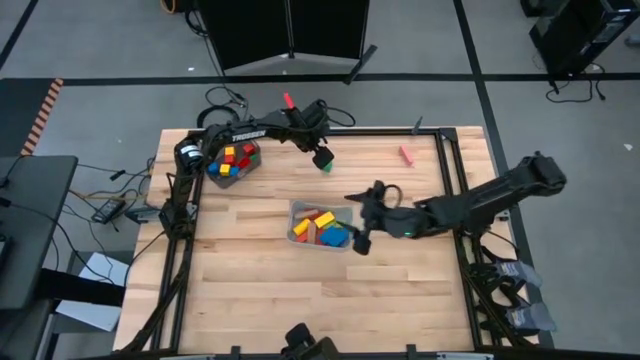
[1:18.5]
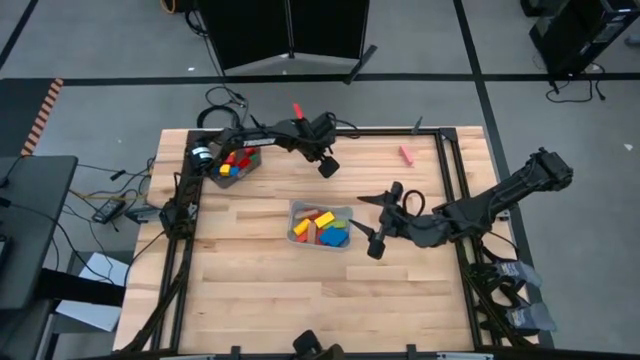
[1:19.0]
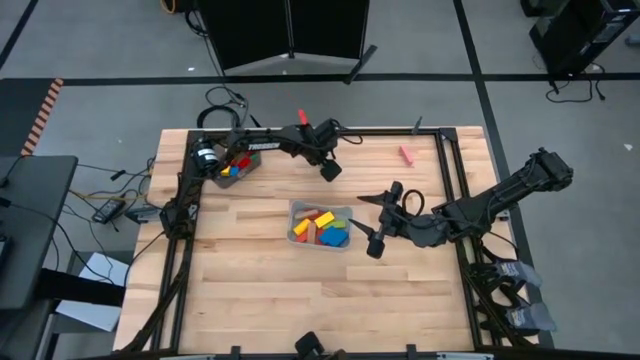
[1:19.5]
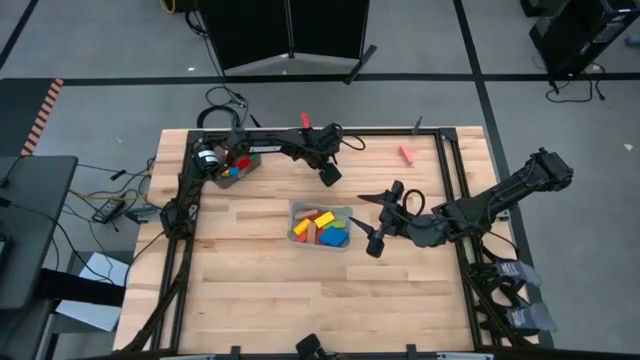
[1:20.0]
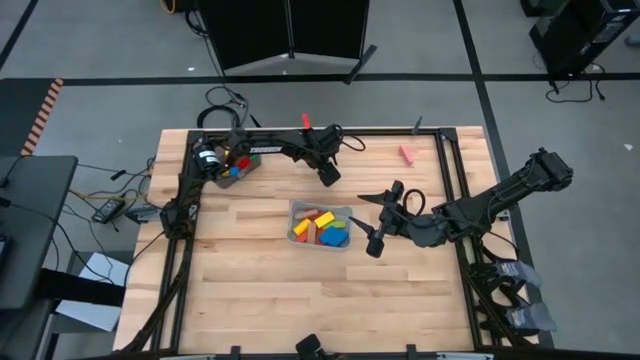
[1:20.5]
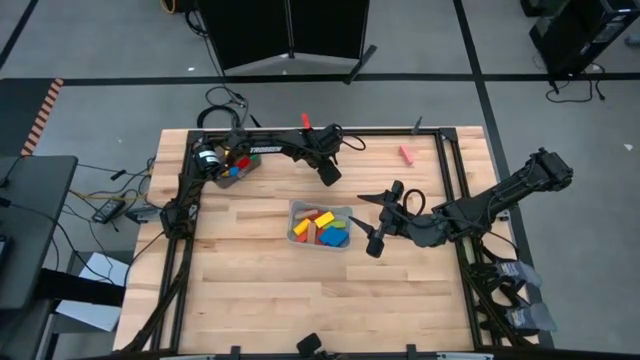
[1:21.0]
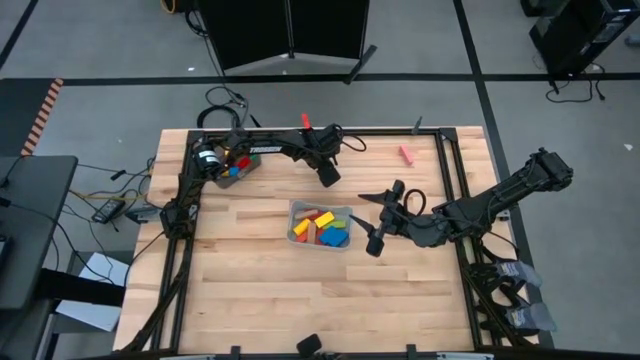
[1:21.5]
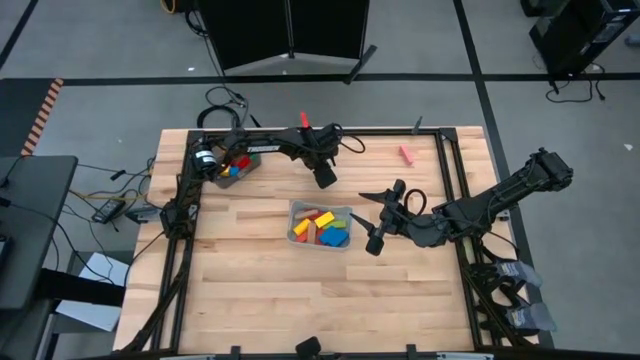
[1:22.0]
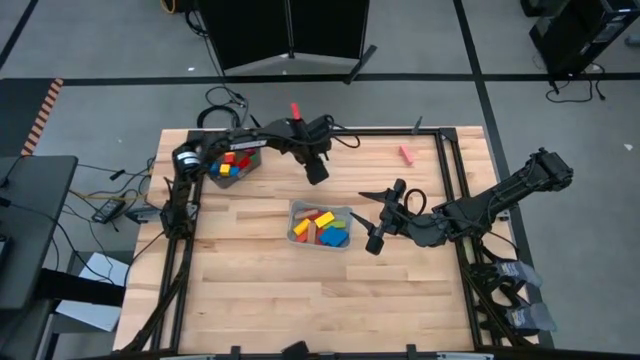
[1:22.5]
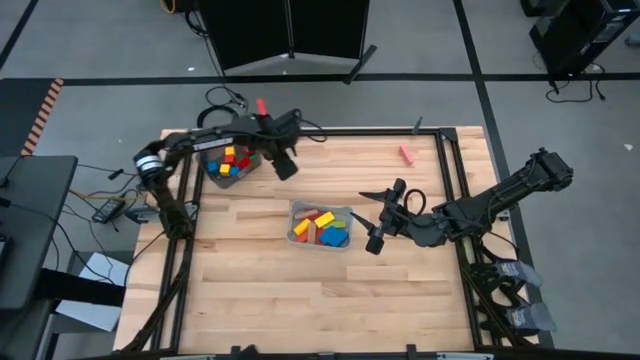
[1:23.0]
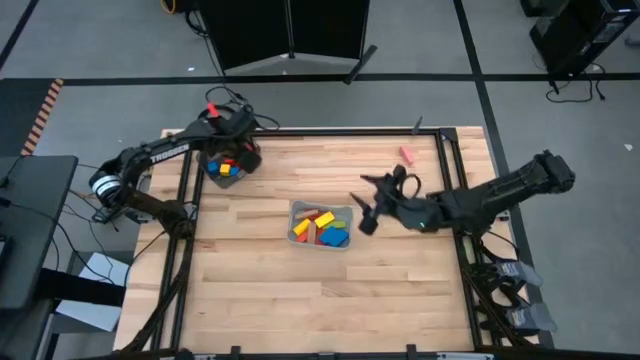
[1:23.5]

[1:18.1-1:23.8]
Task: Sort blocks by size
Put the green cube block into the black bin

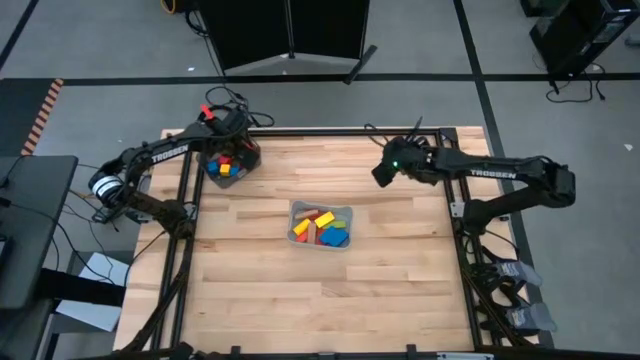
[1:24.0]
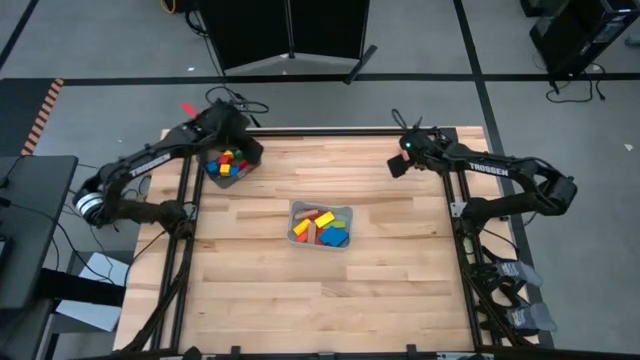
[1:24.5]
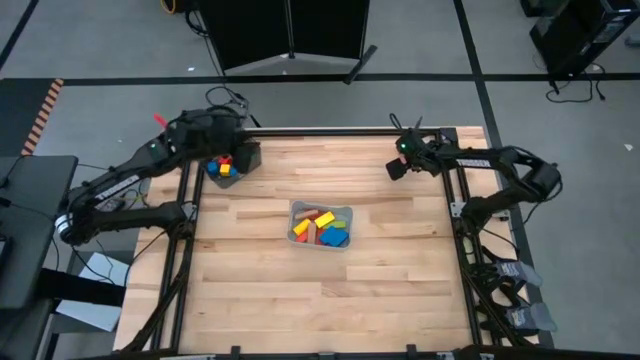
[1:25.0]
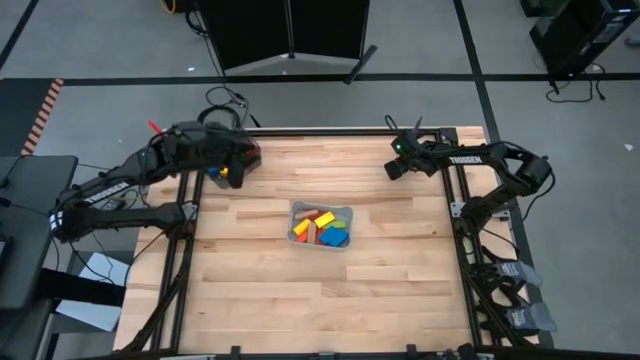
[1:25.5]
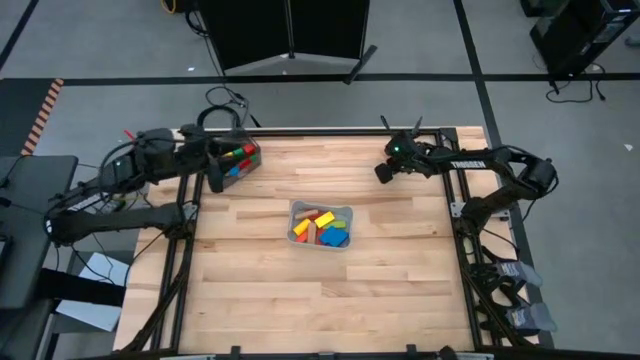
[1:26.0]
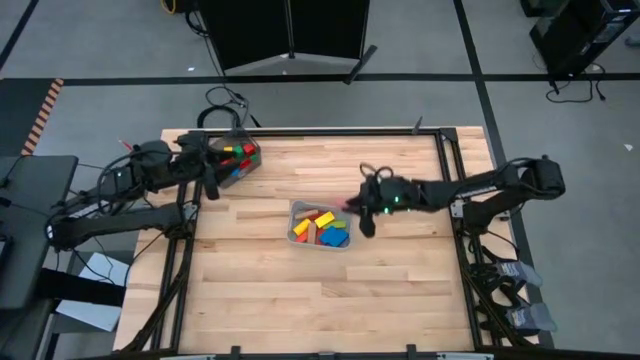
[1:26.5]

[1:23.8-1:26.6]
Put the pink rectangular block into the gray bin

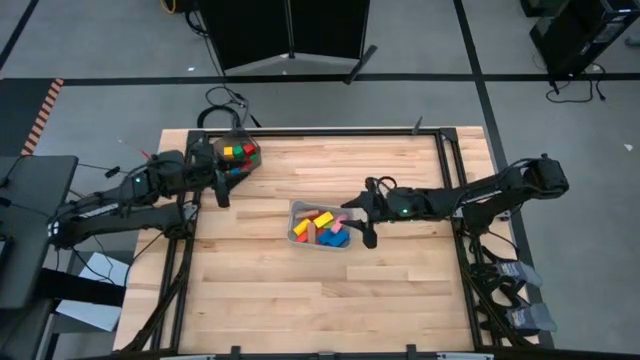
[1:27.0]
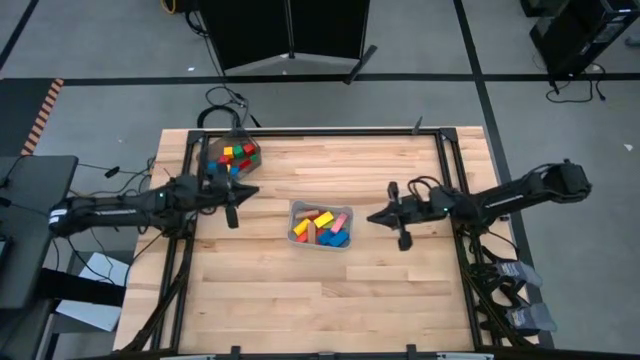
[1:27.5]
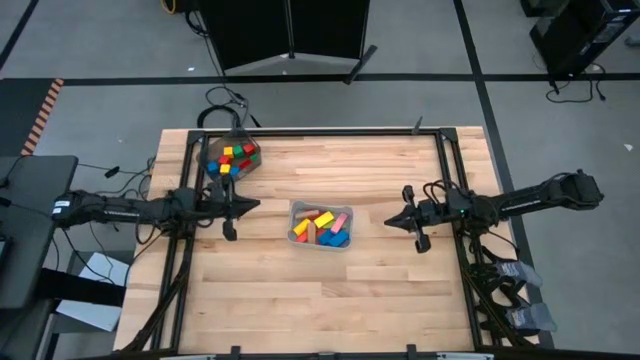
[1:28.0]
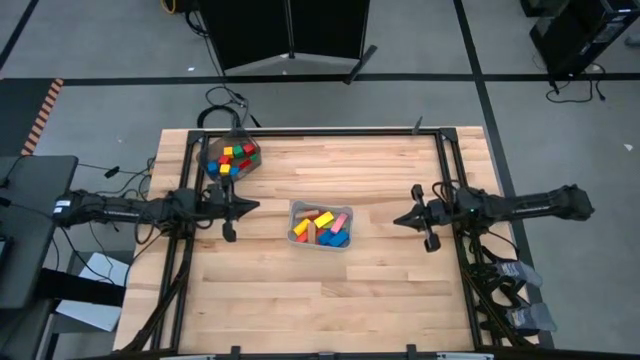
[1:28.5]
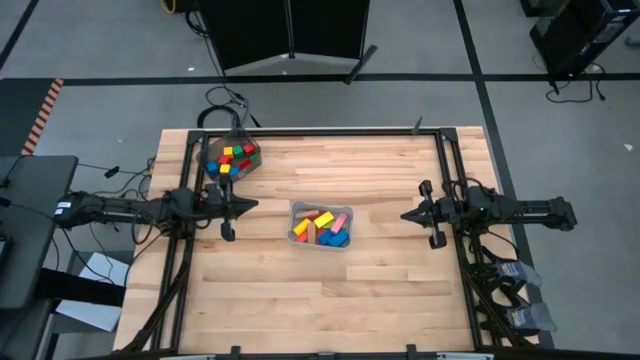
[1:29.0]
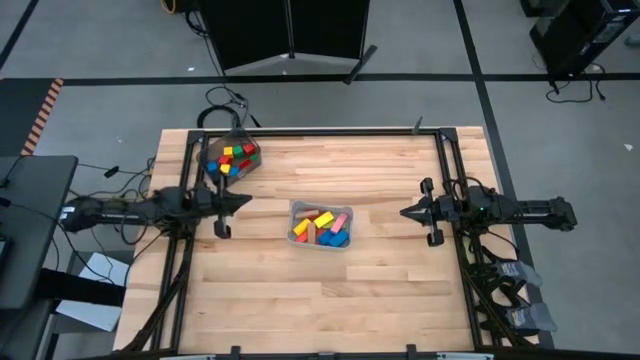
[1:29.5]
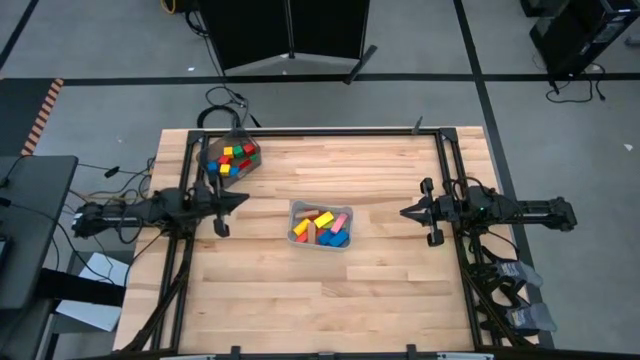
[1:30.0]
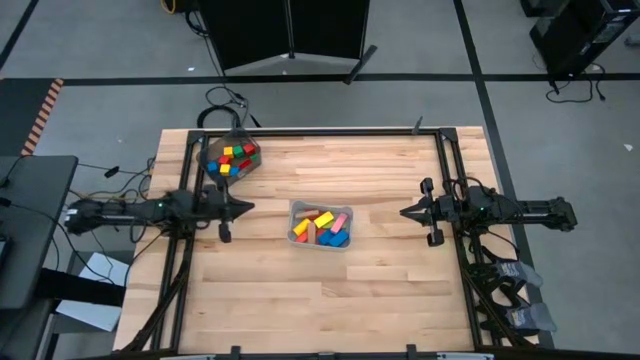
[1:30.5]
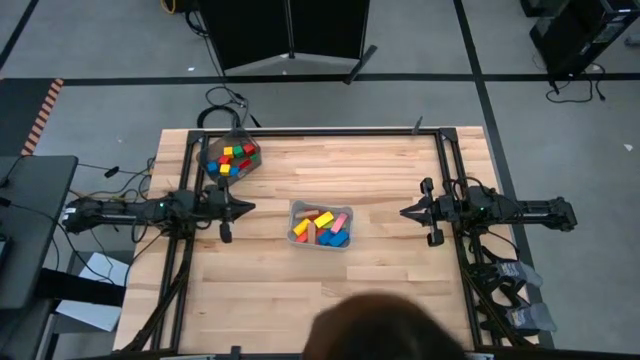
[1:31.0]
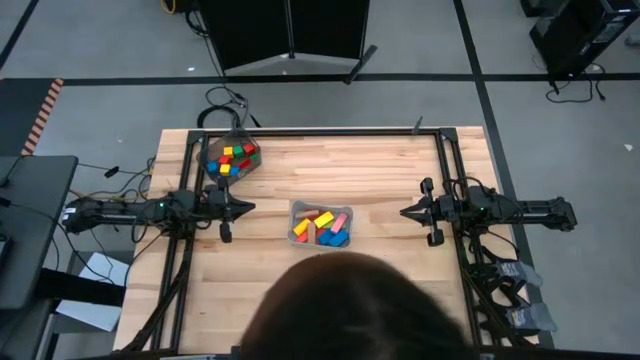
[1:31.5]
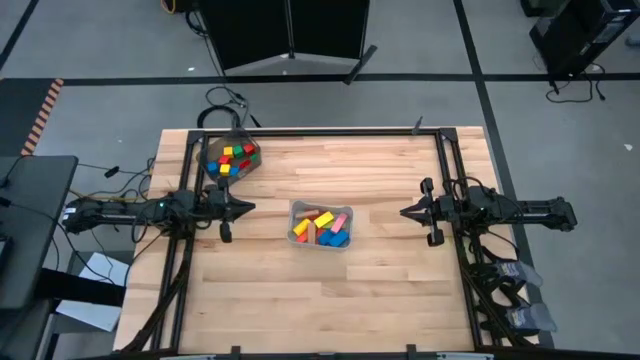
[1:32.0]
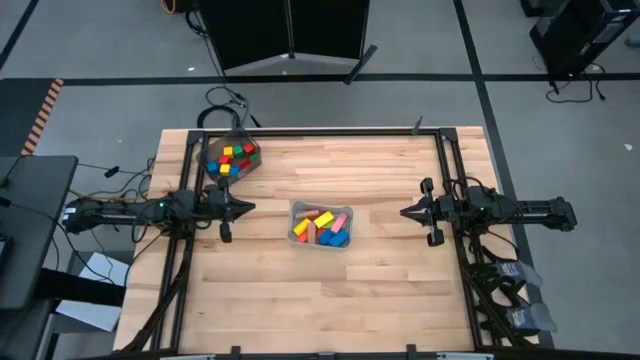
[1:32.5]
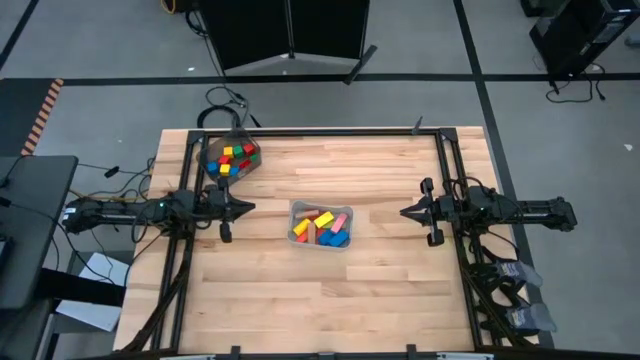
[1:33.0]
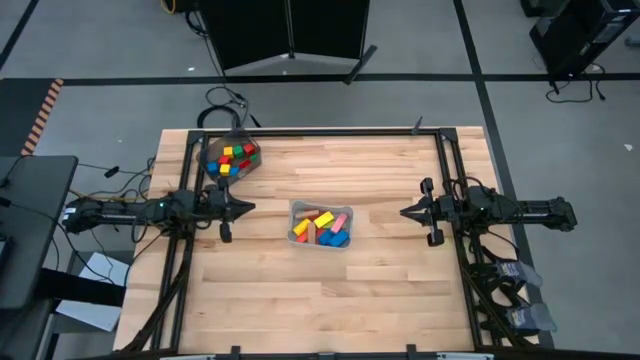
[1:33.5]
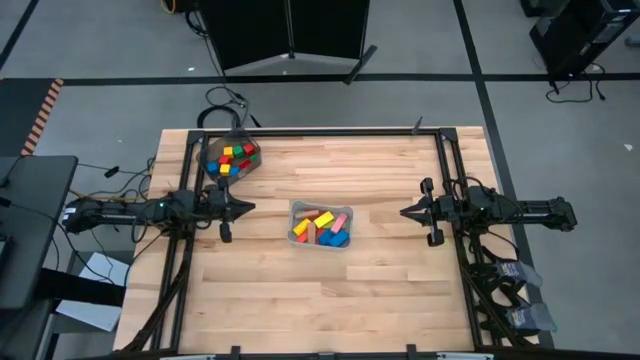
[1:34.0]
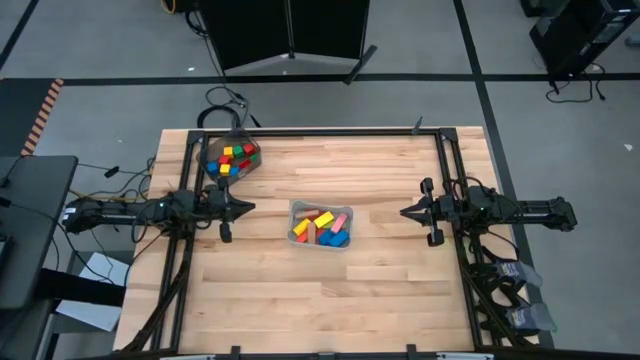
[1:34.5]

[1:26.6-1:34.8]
Return to Home Position

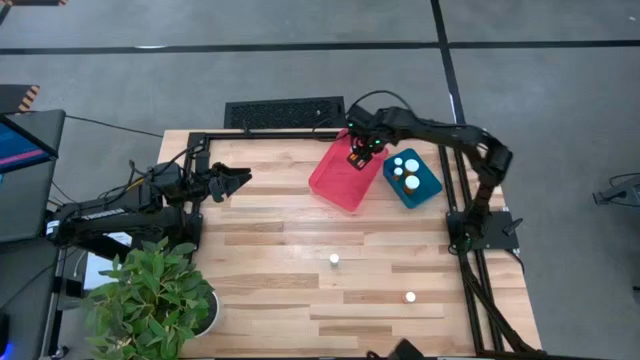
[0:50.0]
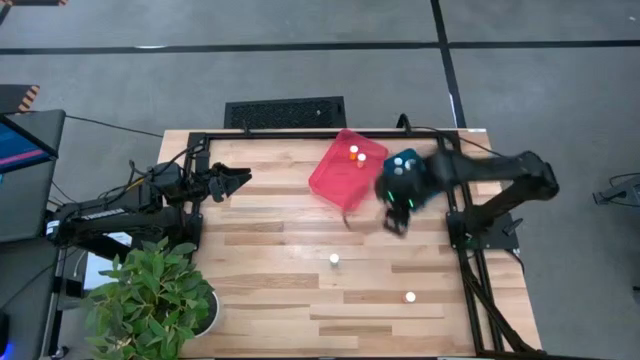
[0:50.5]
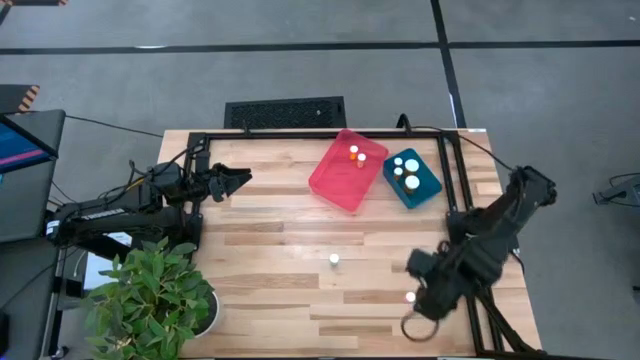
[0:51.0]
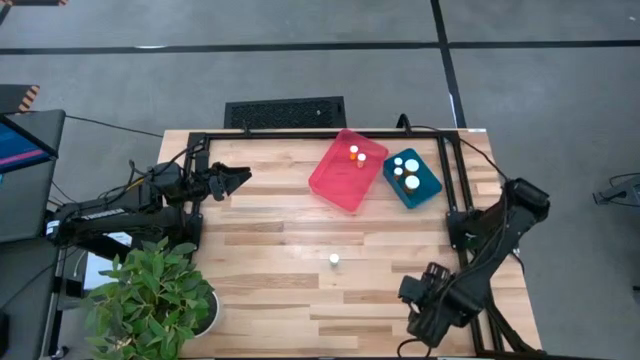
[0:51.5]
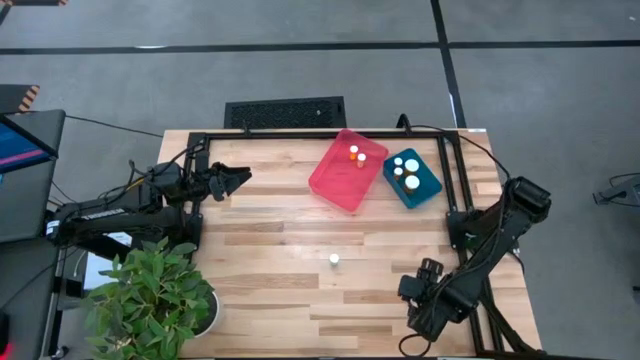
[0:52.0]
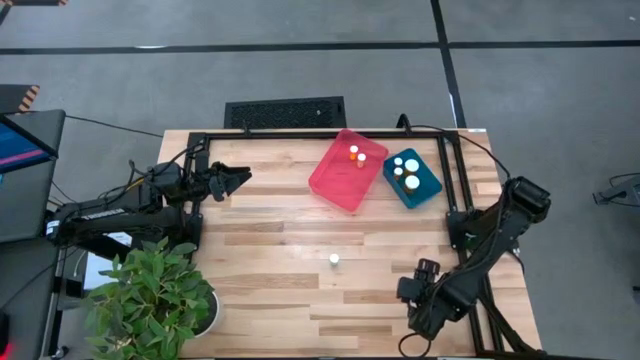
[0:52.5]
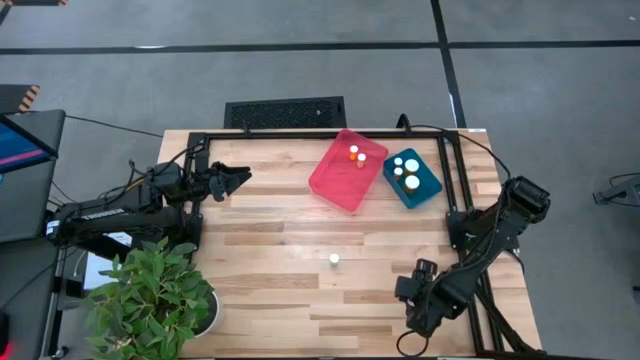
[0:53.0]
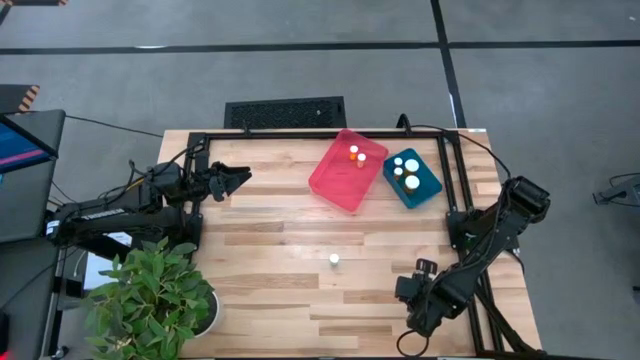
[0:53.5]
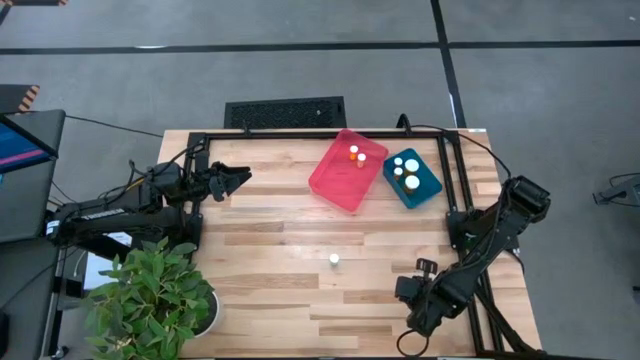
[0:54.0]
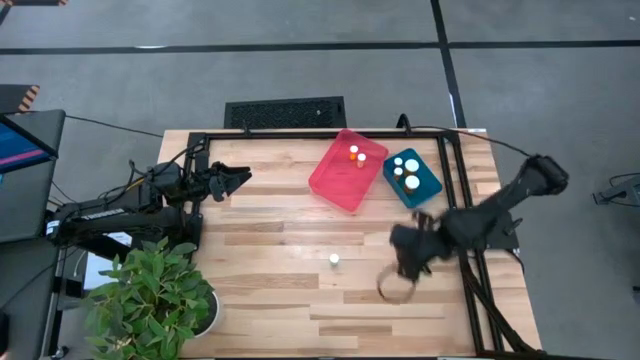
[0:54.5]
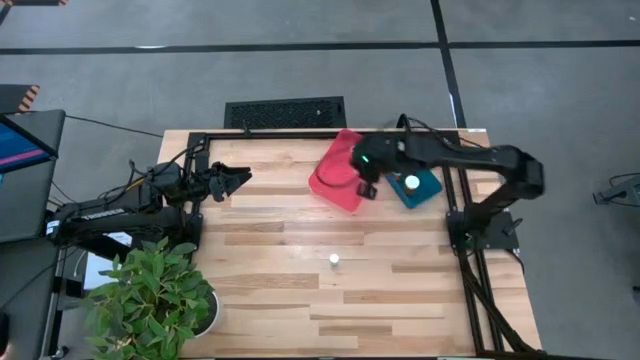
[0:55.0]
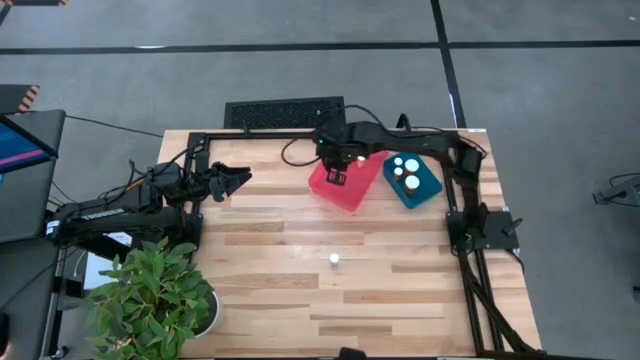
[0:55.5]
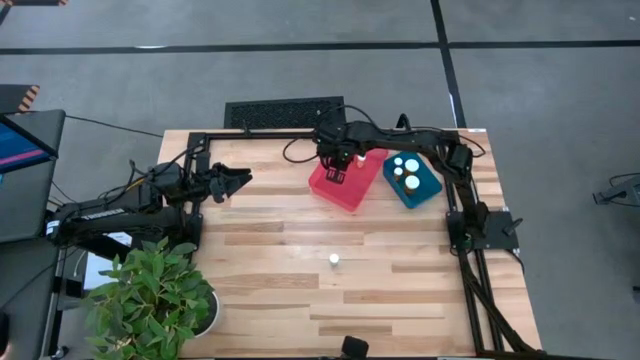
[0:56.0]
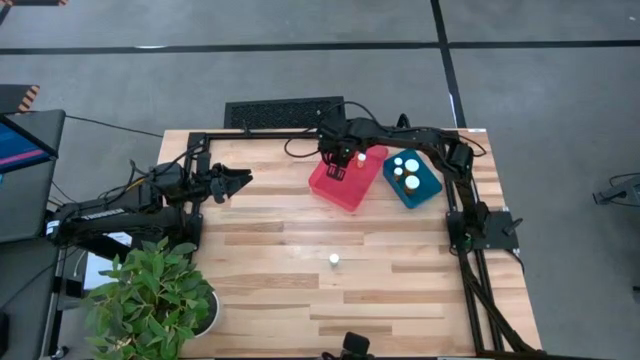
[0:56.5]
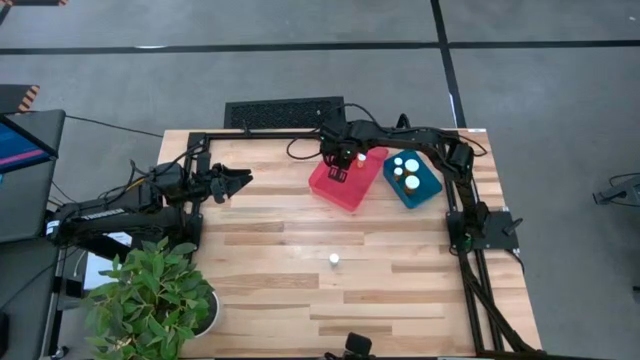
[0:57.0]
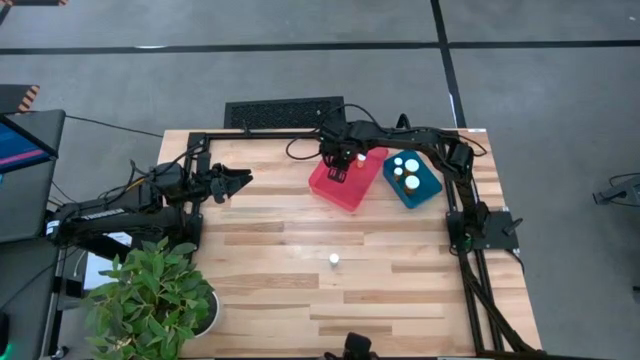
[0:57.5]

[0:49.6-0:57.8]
Task: Pick and place medicine bottles into bin by pill shape (circle, oval)
Put the pink tablet bottle into the red bin
